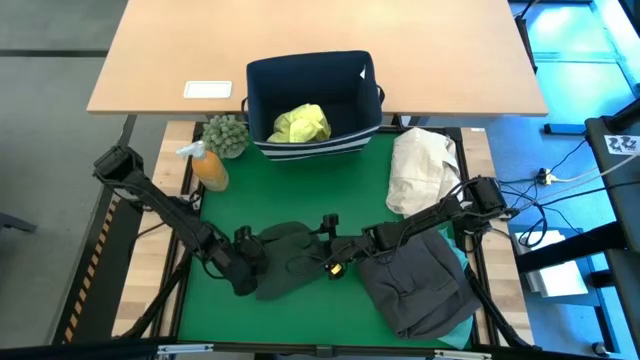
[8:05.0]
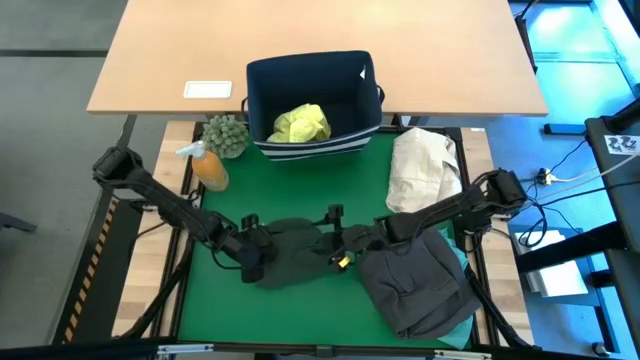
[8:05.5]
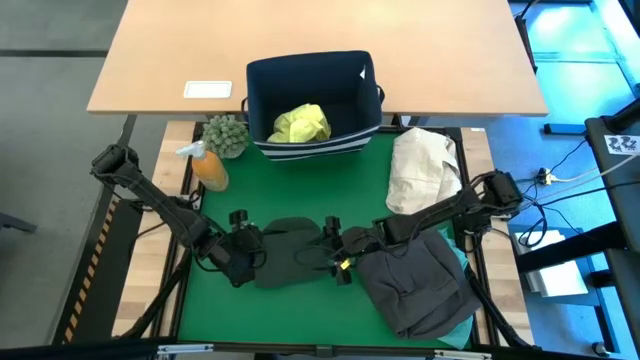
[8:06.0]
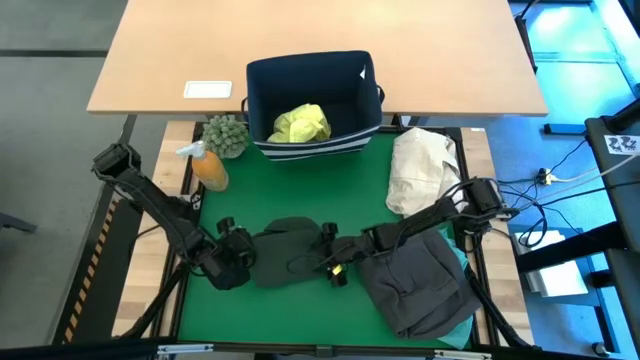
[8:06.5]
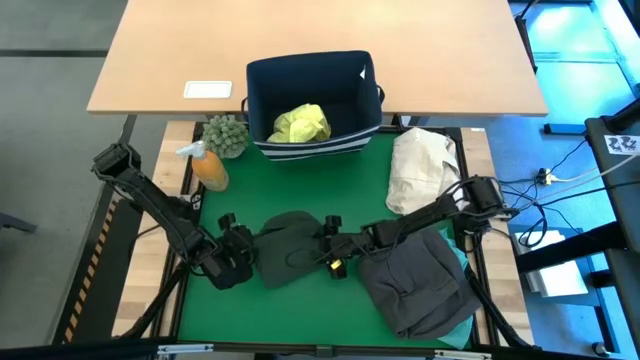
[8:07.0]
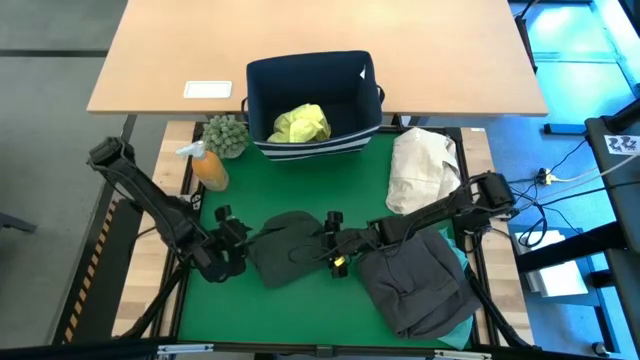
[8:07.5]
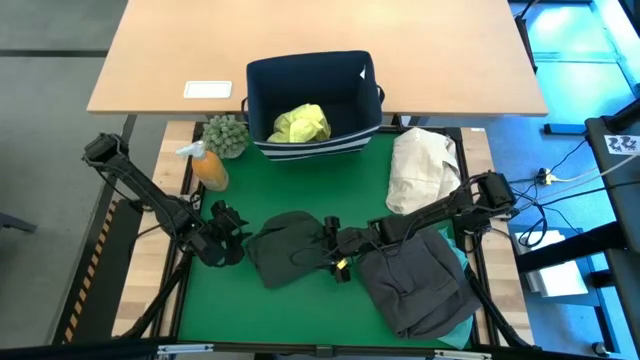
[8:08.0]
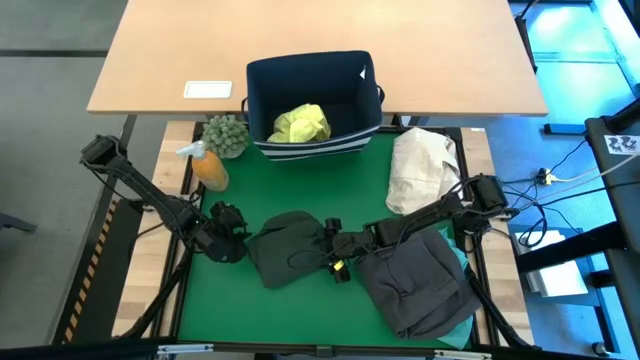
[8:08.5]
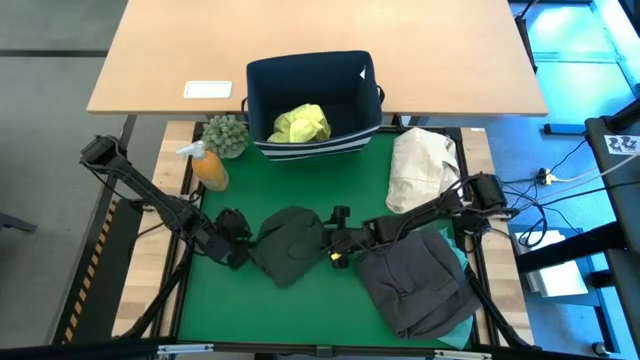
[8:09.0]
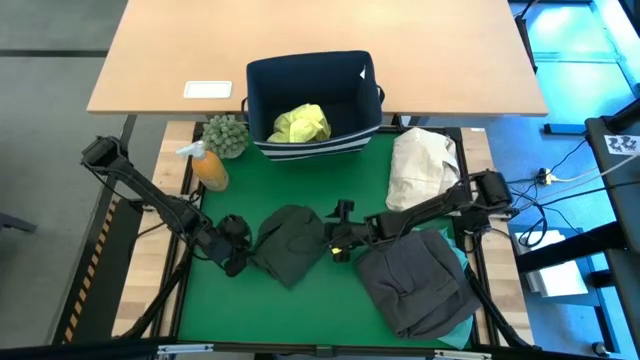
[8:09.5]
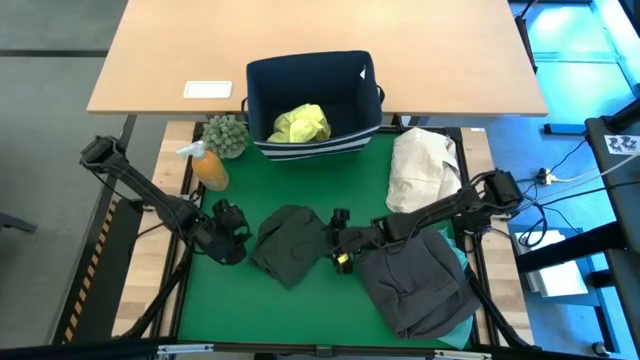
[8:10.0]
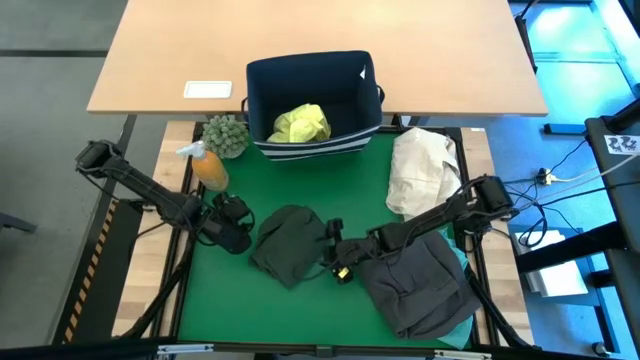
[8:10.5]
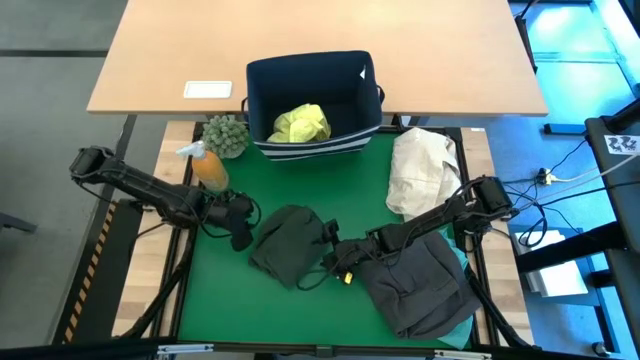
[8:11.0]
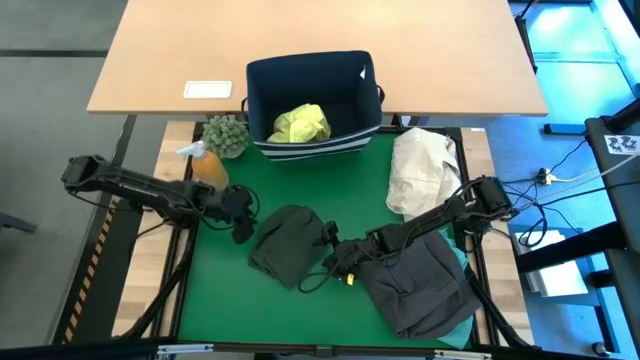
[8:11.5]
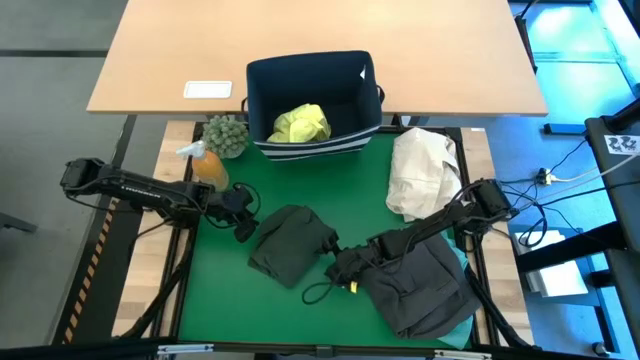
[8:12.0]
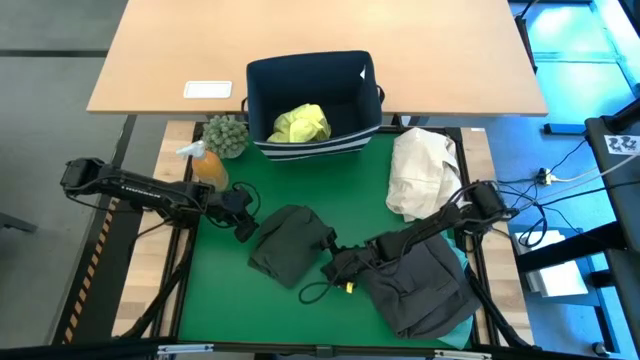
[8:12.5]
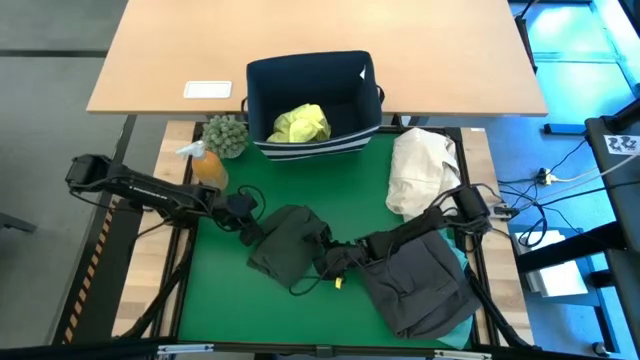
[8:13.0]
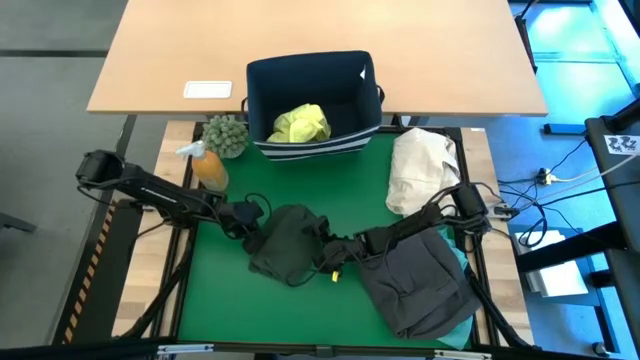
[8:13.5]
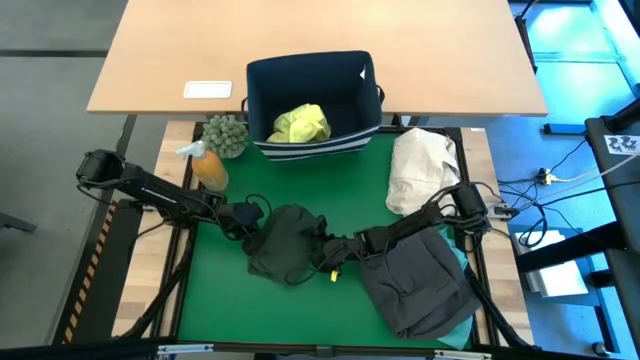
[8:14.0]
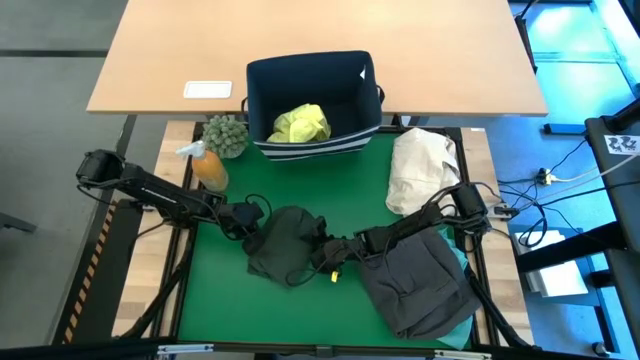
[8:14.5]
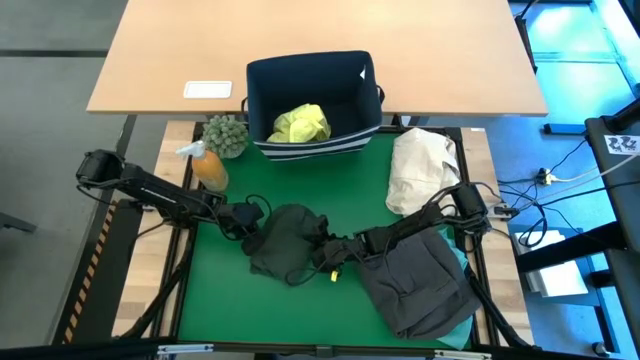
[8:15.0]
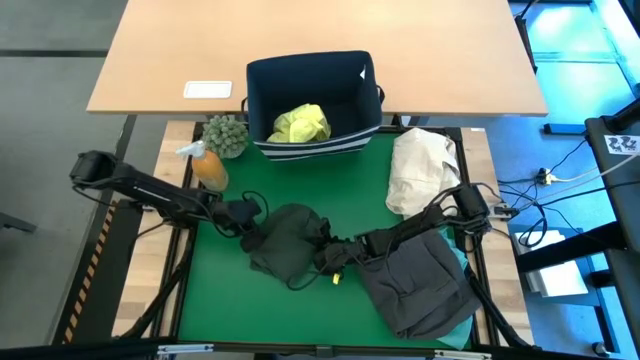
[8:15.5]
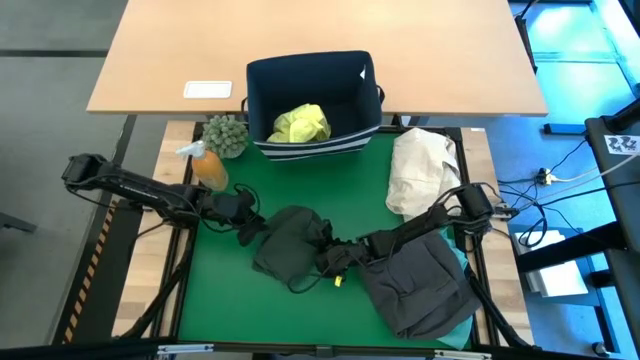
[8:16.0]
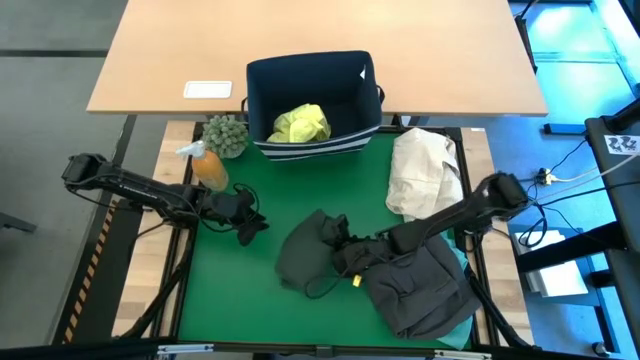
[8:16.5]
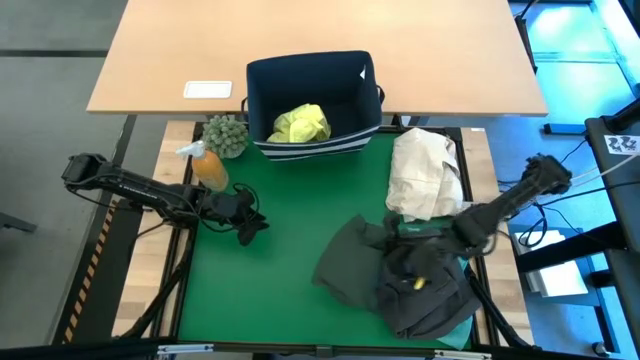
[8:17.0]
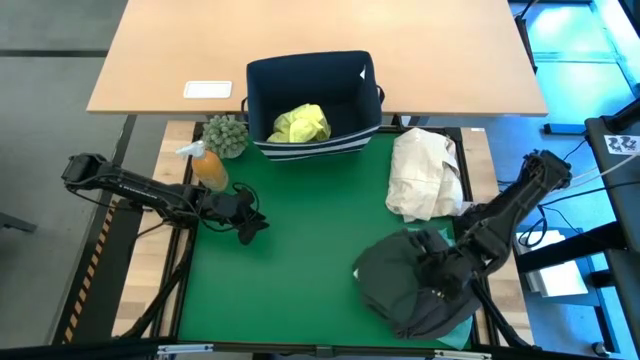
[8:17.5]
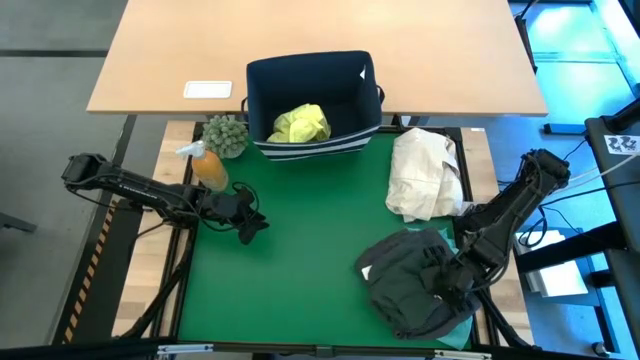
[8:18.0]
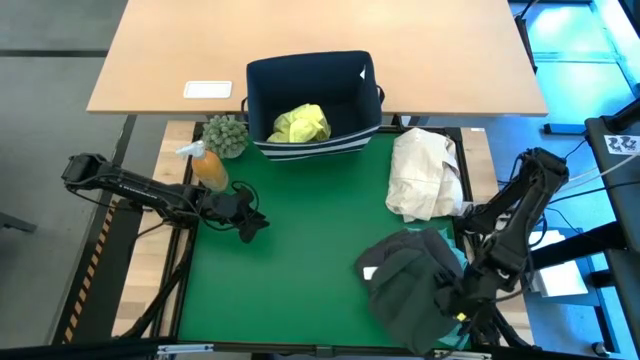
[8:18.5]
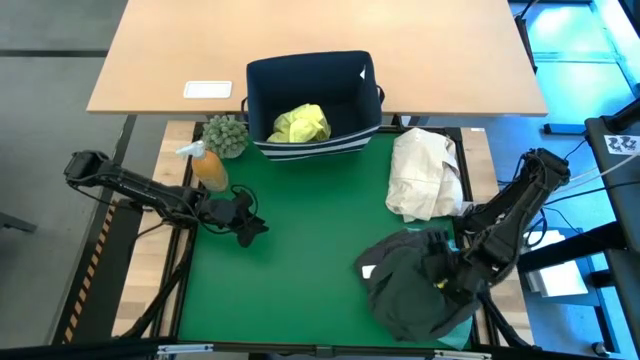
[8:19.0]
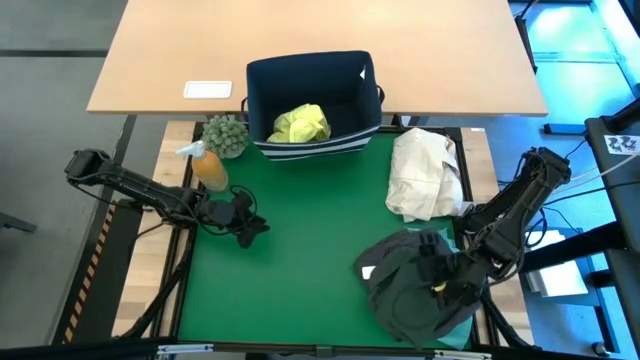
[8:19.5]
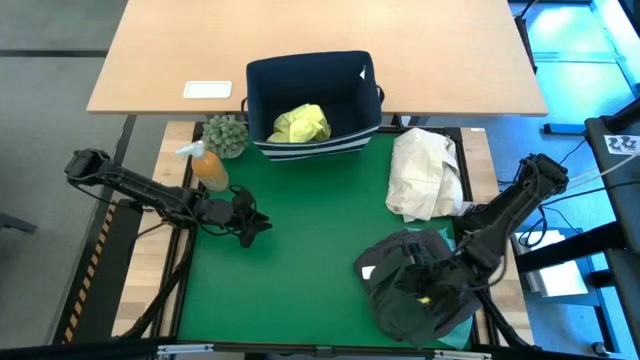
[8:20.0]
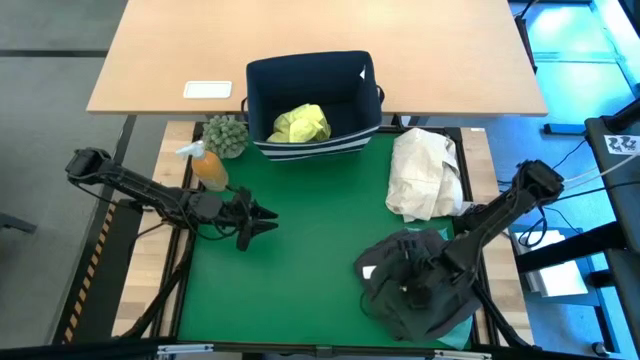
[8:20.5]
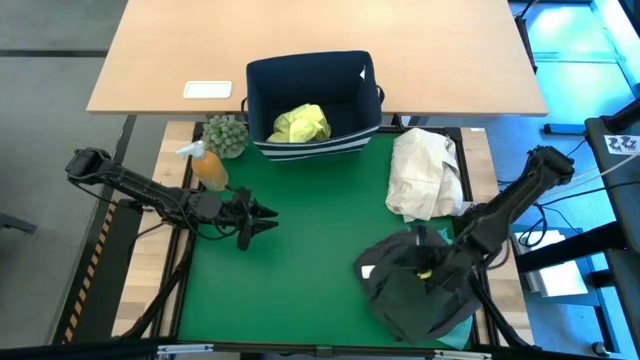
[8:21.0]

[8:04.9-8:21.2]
Task: Fold laundry
Stack the green polo on the black shorts
